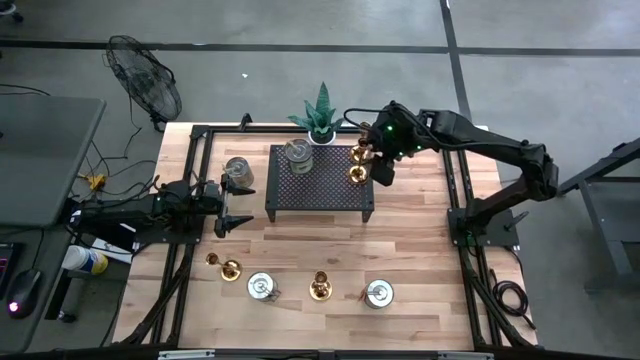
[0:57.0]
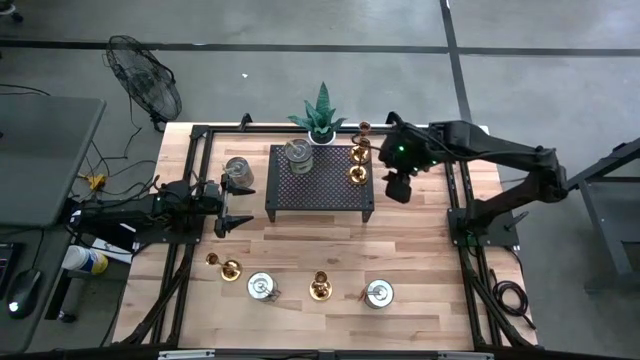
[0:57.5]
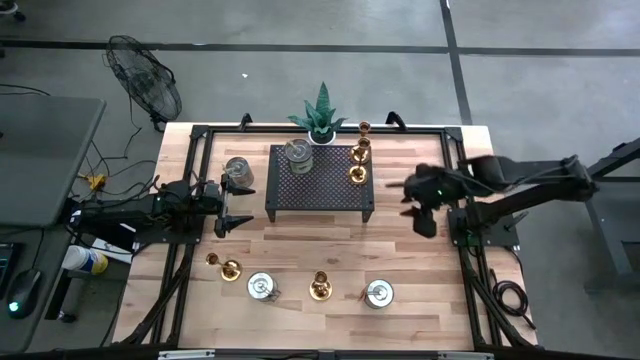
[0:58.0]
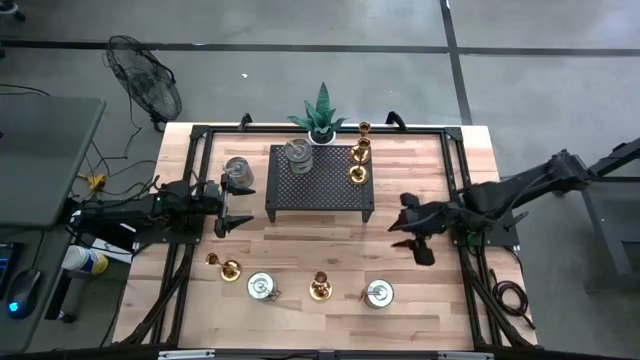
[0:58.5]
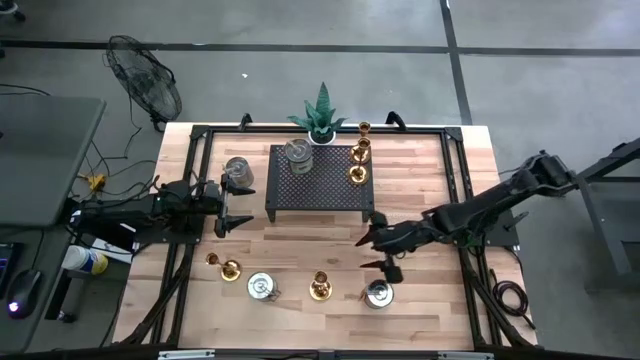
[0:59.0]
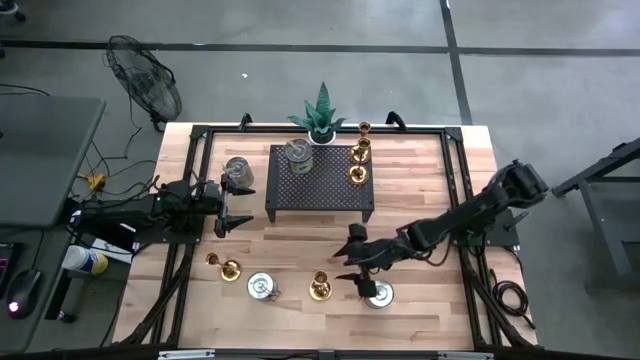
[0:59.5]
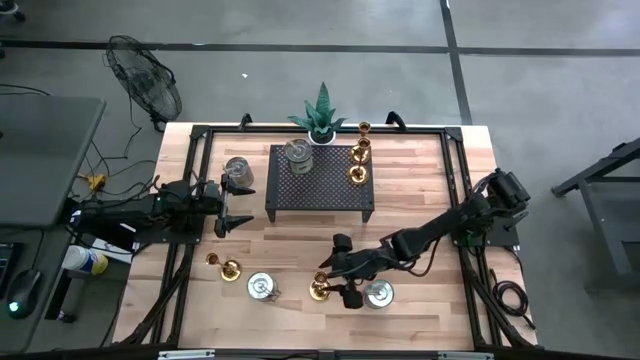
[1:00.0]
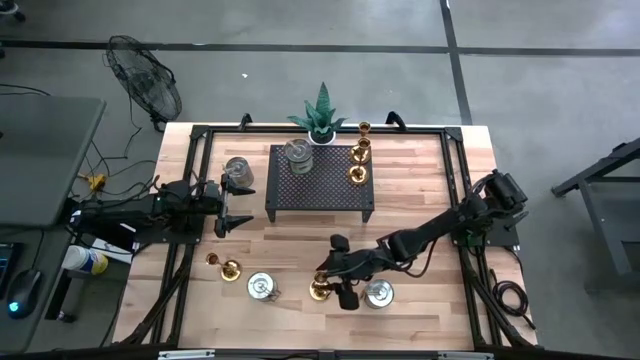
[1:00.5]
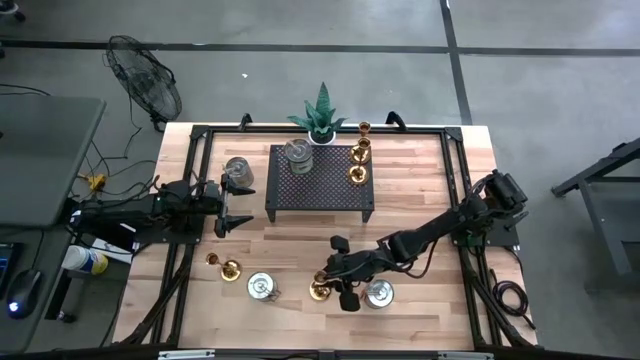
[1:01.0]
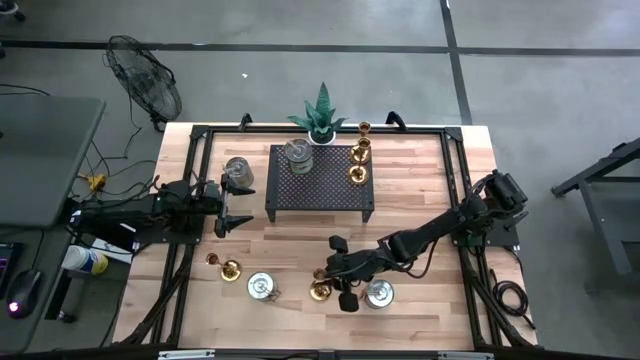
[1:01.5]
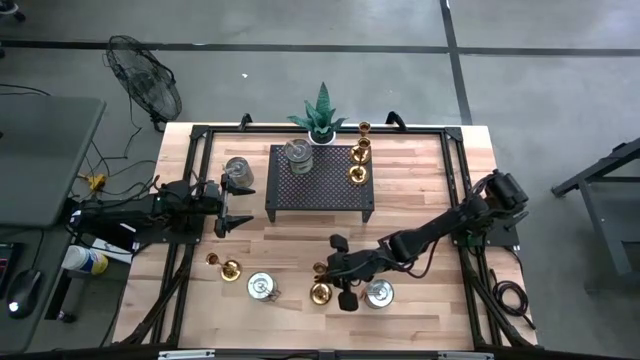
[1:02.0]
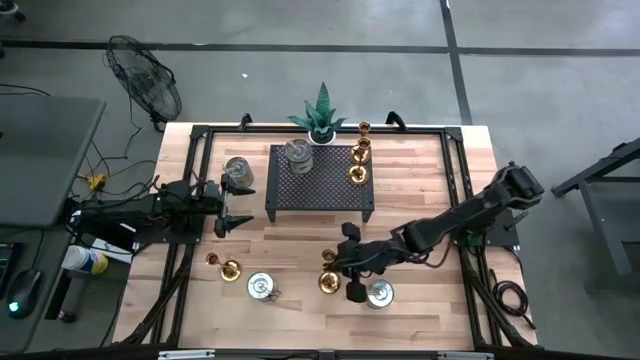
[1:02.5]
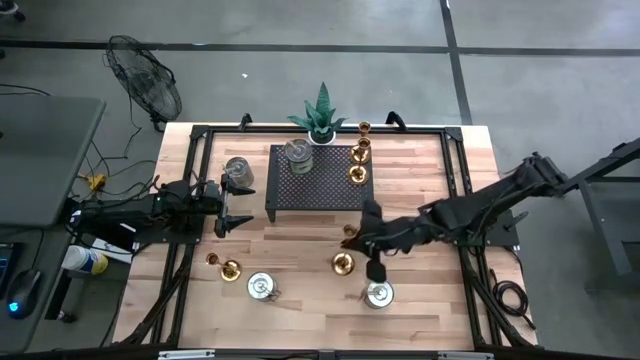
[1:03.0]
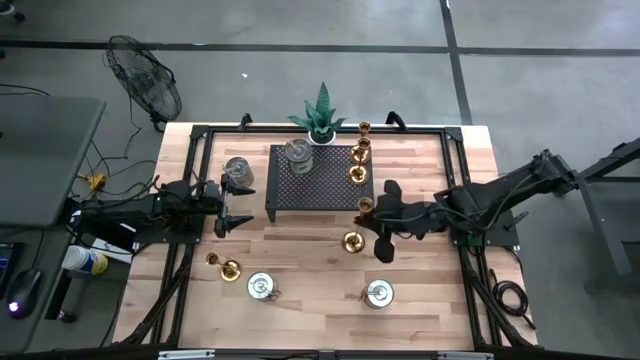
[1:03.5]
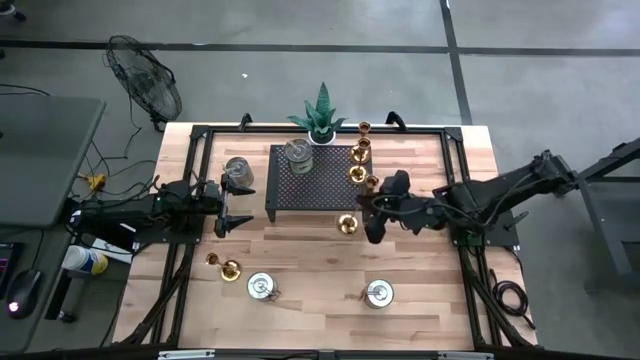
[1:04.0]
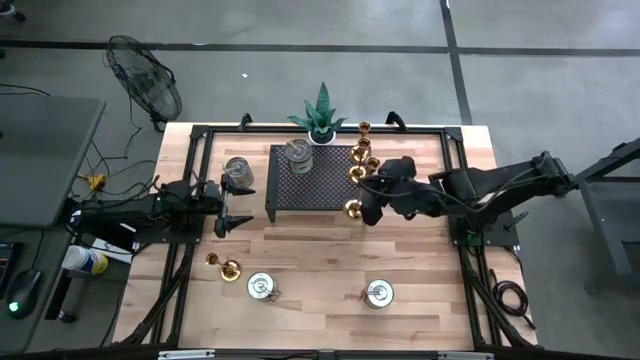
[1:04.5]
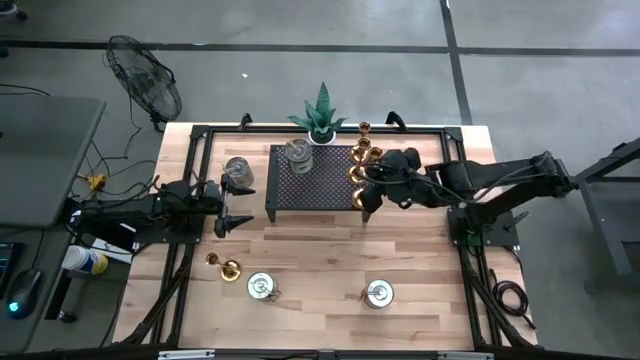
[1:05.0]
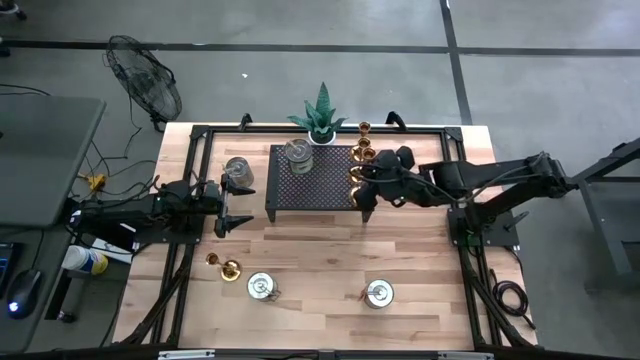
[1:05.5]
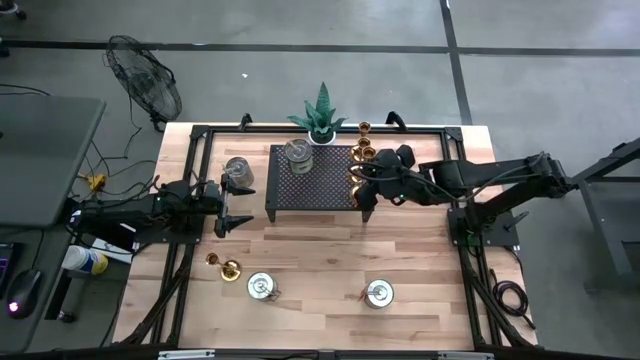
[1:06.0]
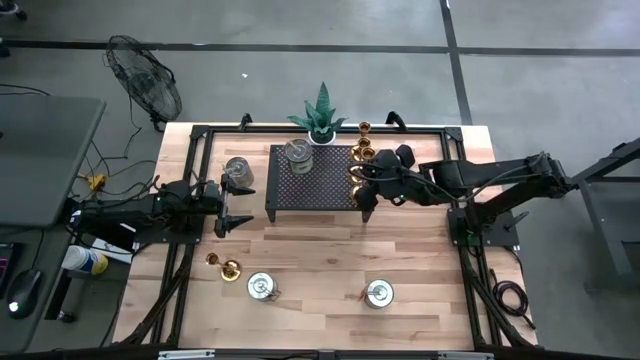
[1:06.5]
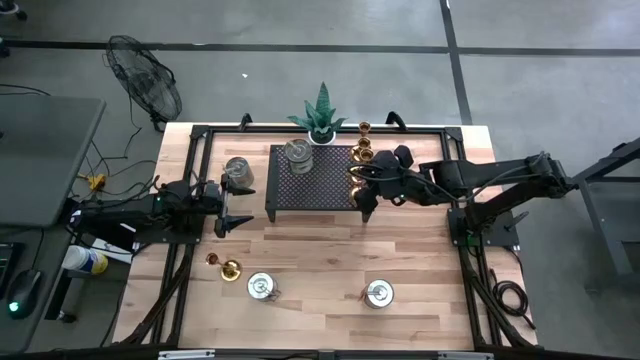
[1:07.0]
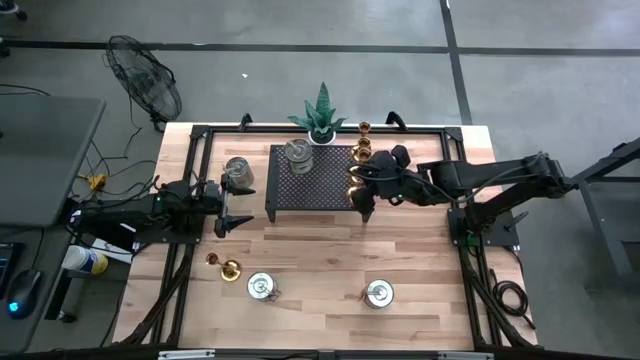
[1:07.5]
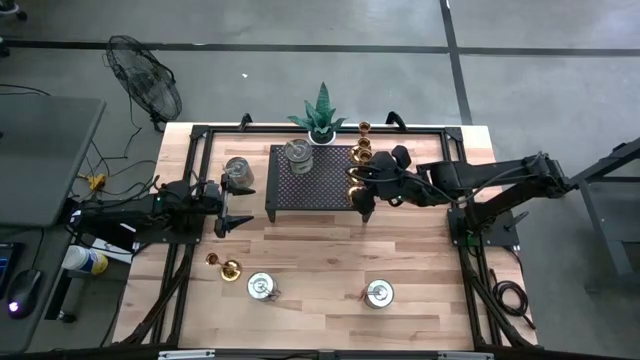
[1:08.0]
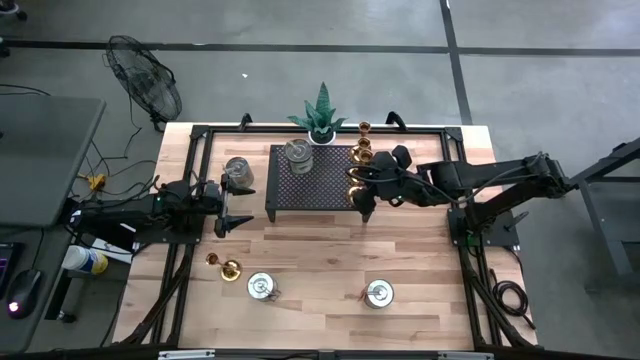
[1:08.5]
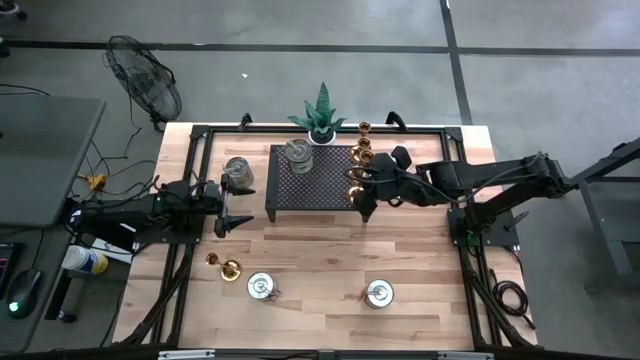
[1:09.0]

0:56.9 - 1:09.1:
Task: Pick & Place candle stick holders
Align the gold candle holder on the shelf with the other gold candle holders

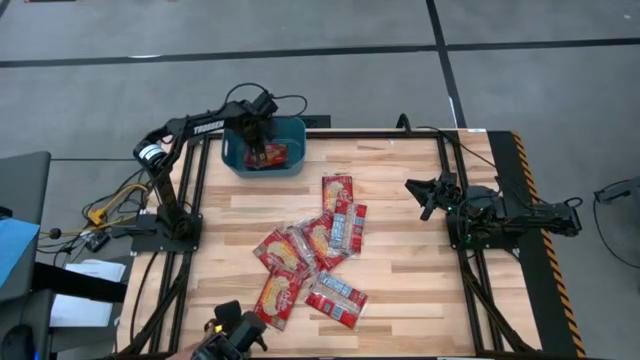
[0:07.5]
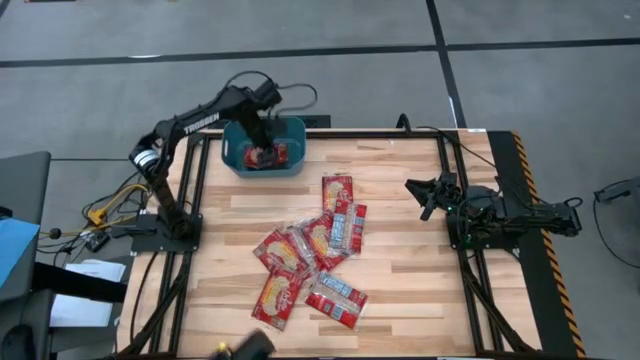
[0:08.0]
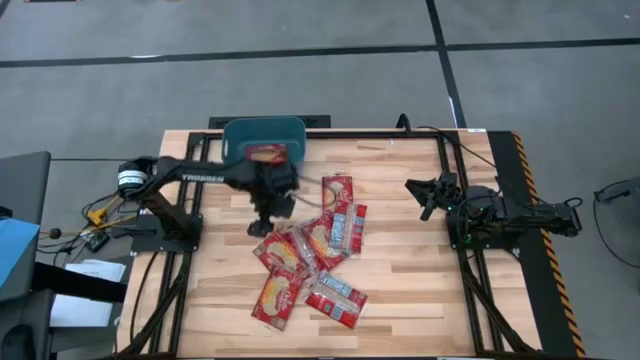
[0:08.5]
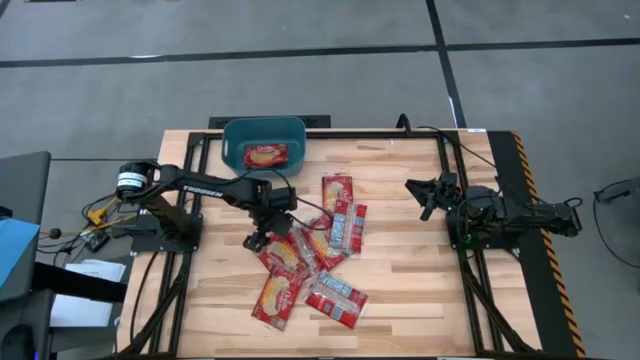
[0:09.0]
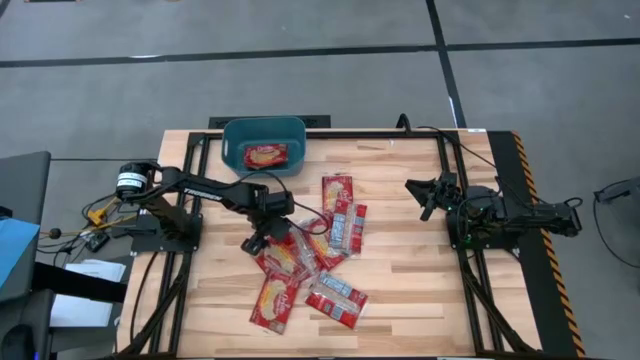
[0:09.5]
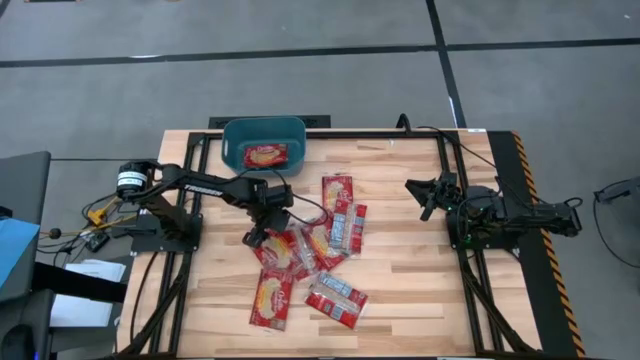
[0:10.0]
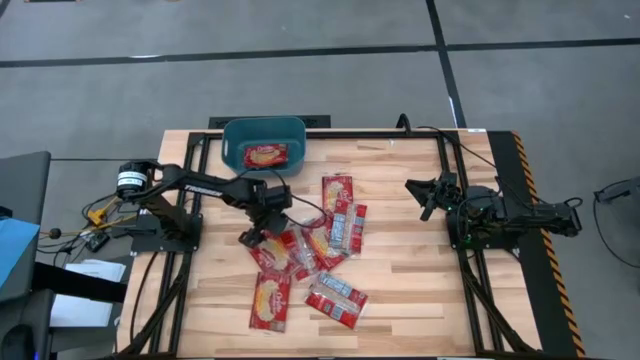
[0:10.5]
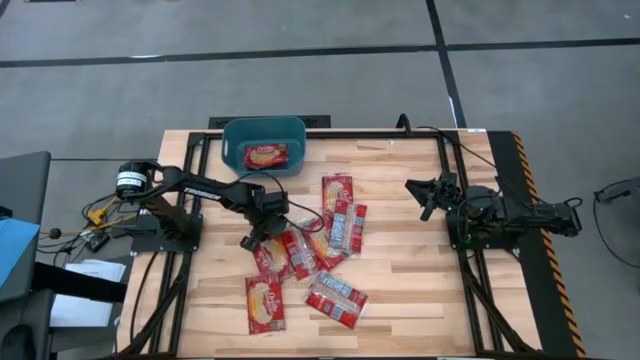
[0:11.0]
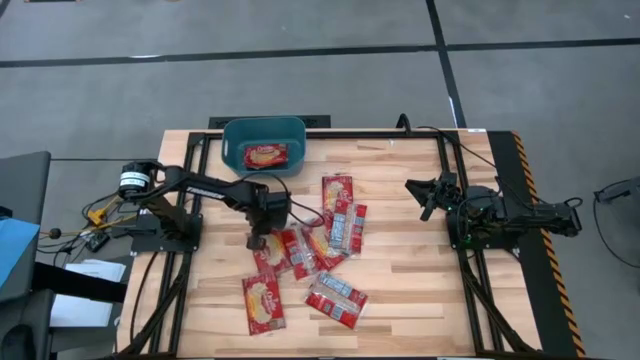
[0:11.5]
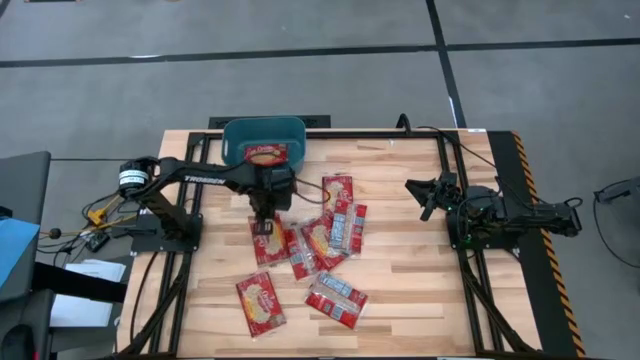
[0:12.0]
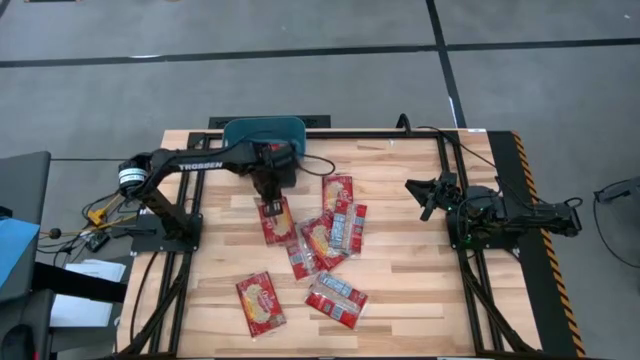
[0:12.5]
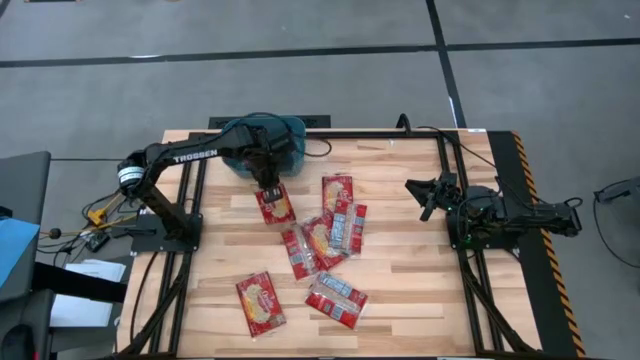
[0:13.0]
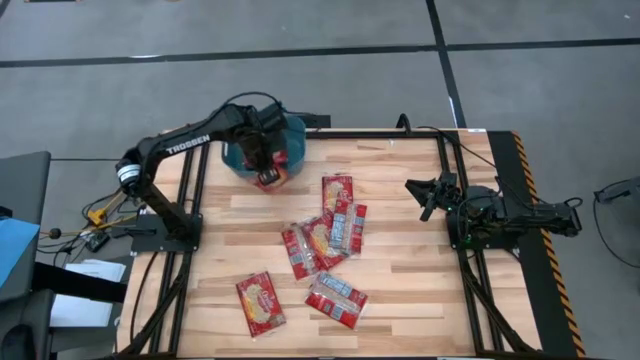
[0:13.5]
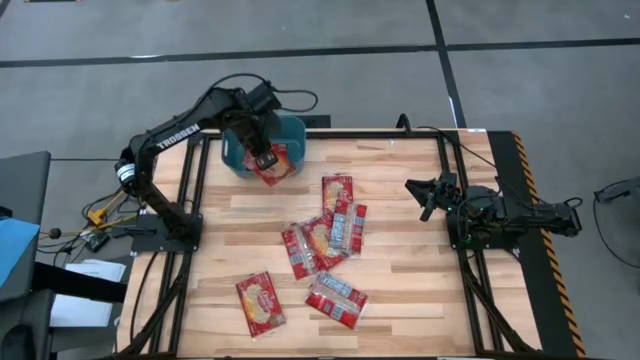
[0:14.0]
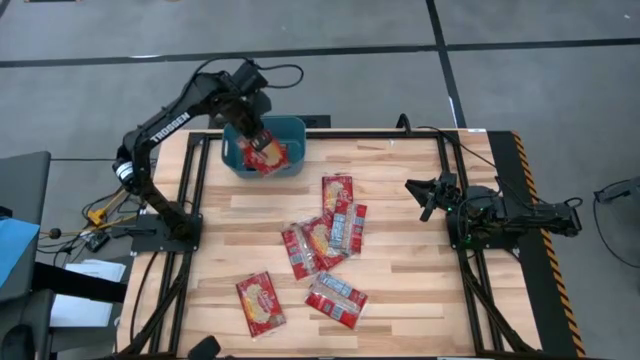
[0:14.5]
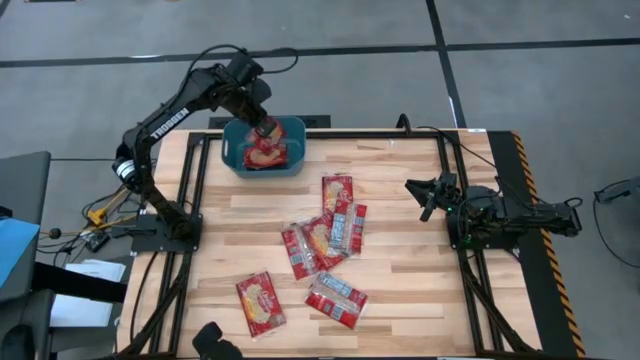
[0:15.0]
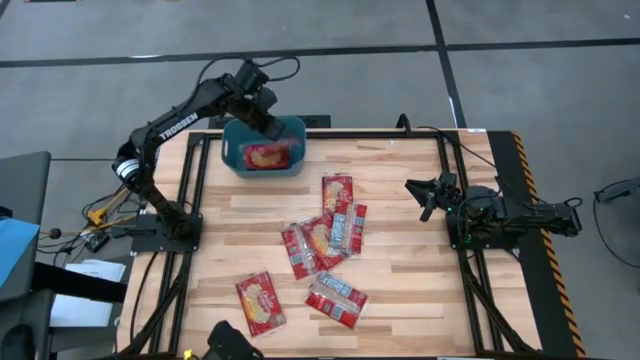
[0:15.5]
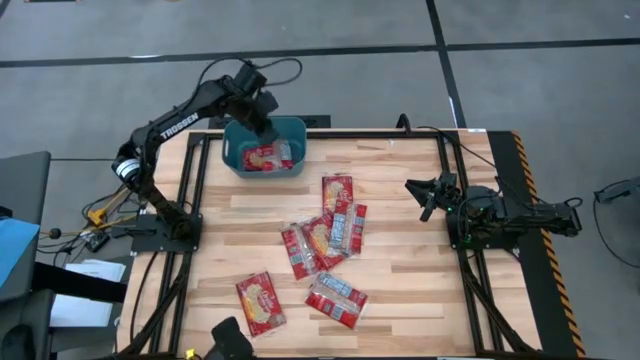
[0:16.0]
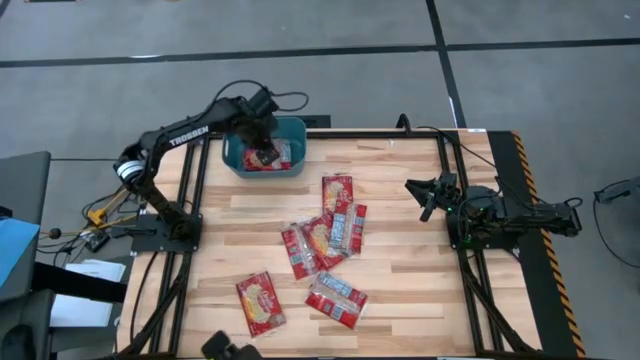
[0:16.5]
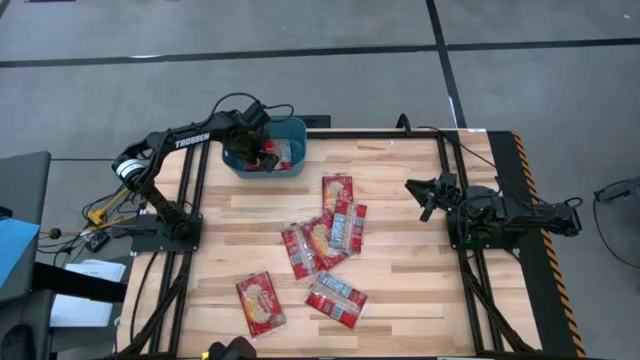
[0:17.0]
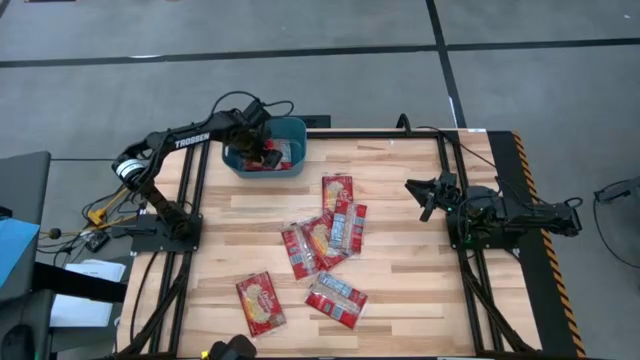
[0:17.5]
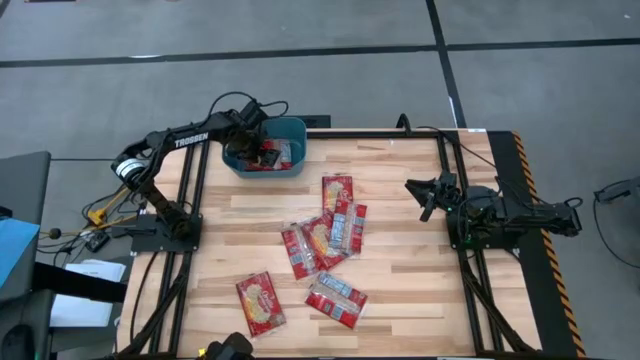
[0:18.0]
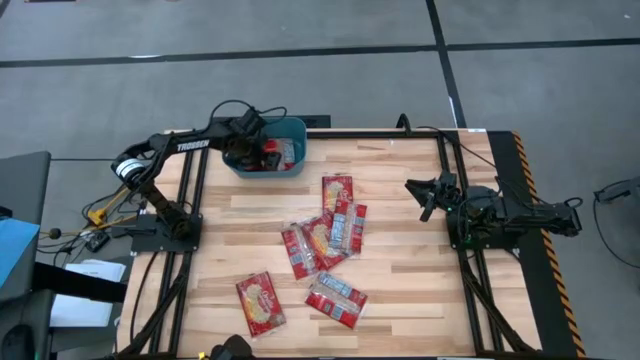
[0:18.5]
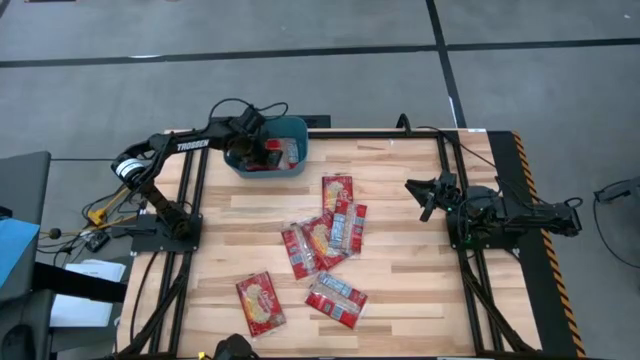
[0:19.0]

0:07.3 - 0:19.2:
Task: Sort popcorn bags into baskets
Put the red popcorn bag into the blue bin
